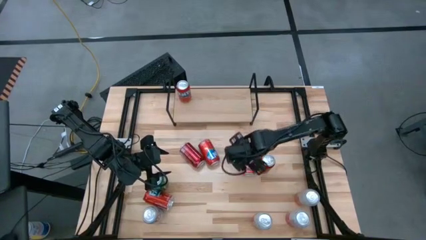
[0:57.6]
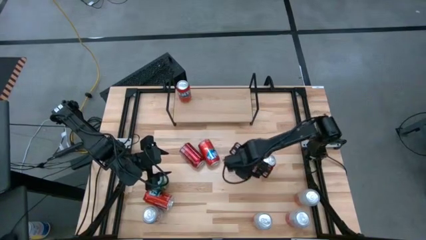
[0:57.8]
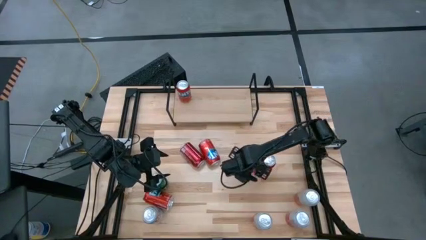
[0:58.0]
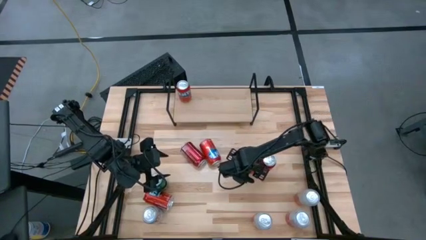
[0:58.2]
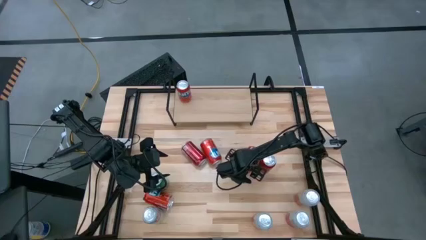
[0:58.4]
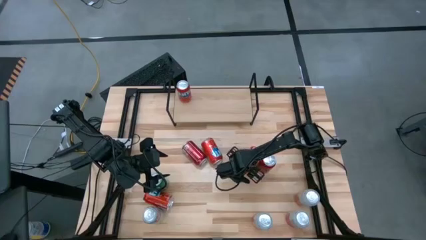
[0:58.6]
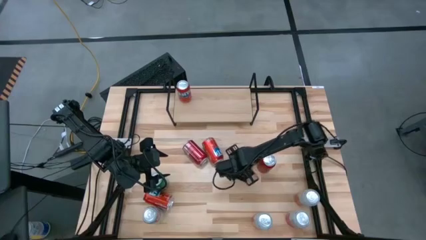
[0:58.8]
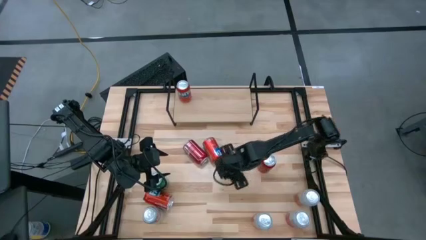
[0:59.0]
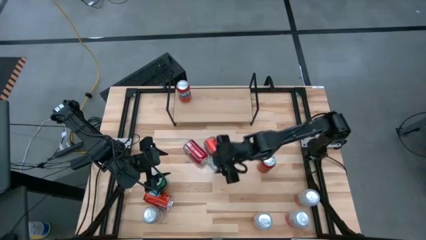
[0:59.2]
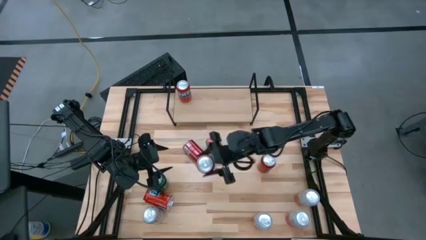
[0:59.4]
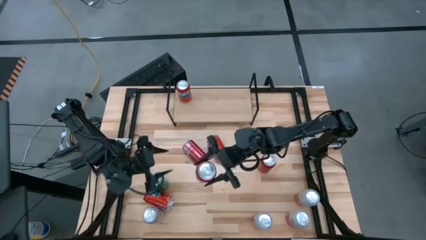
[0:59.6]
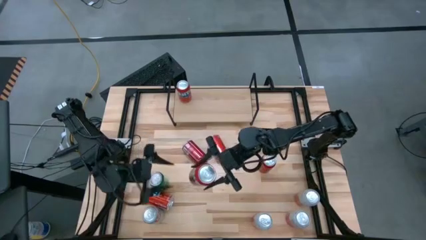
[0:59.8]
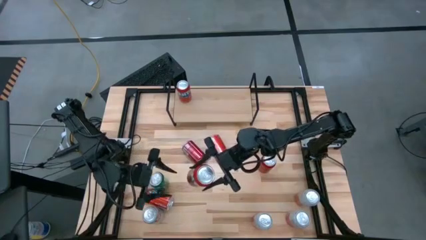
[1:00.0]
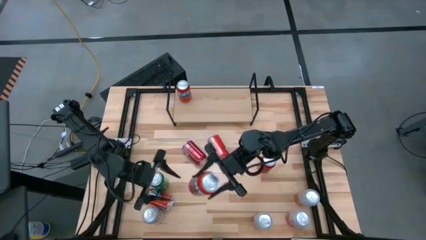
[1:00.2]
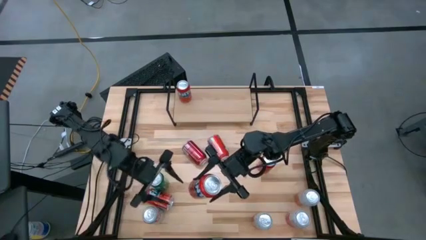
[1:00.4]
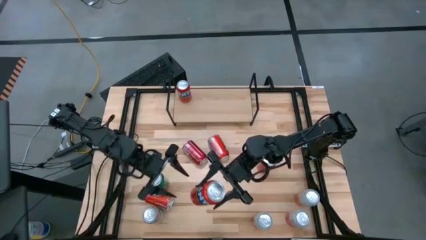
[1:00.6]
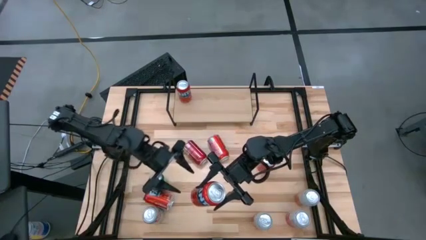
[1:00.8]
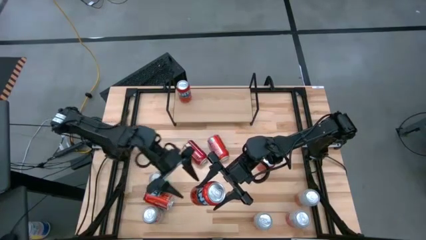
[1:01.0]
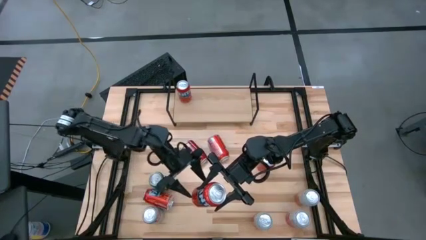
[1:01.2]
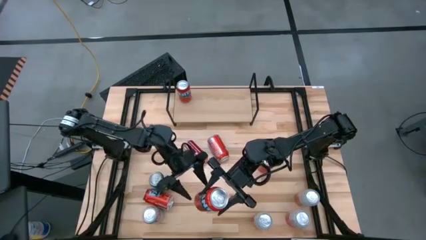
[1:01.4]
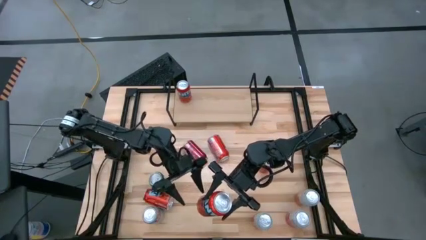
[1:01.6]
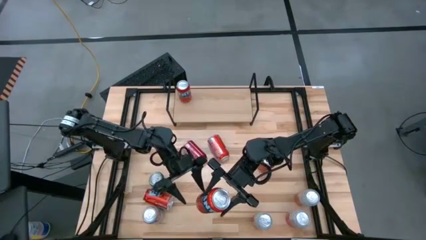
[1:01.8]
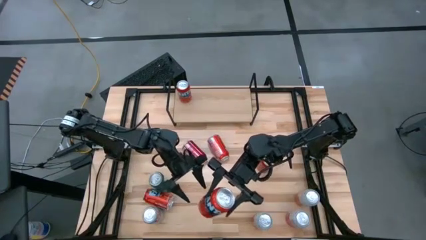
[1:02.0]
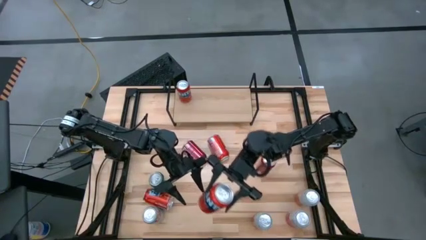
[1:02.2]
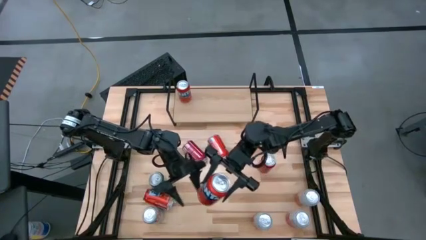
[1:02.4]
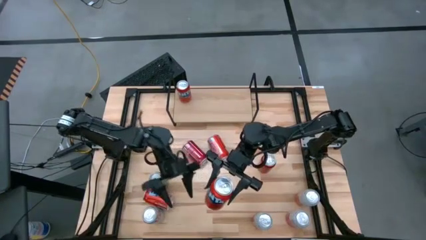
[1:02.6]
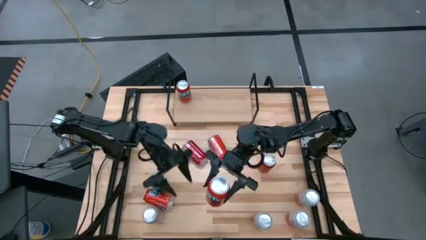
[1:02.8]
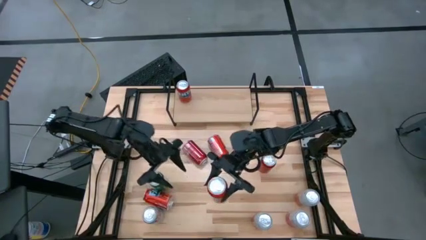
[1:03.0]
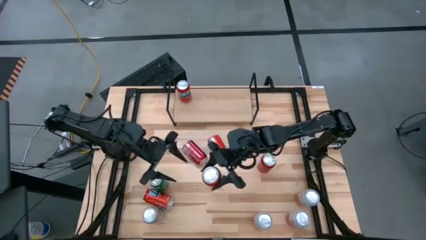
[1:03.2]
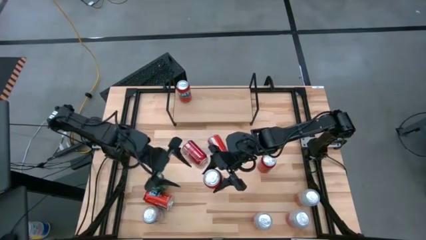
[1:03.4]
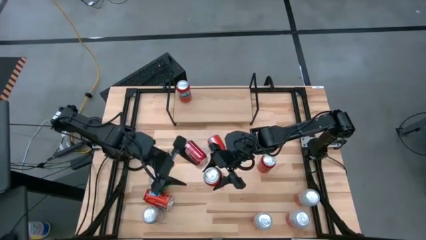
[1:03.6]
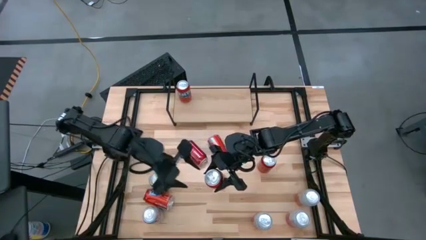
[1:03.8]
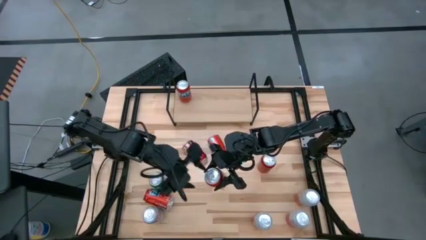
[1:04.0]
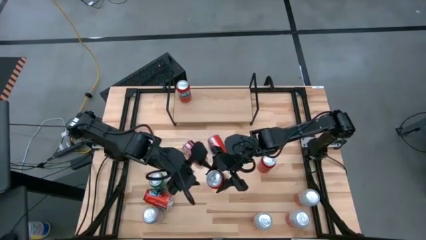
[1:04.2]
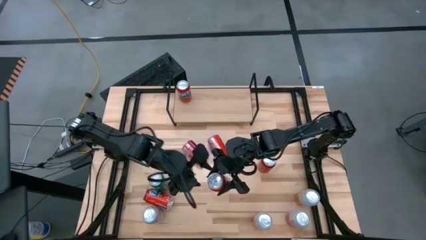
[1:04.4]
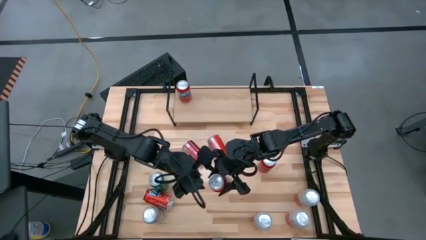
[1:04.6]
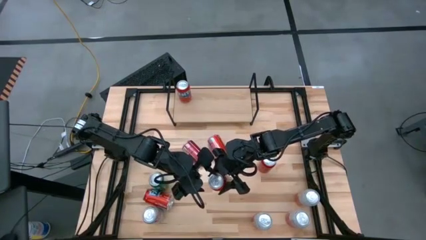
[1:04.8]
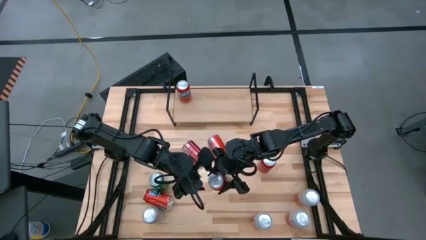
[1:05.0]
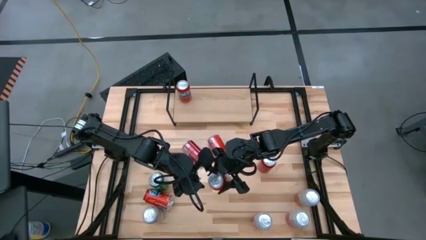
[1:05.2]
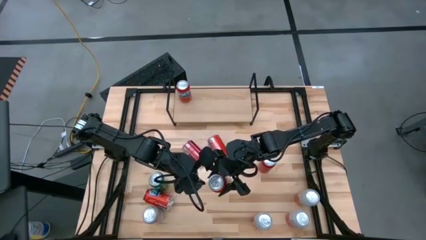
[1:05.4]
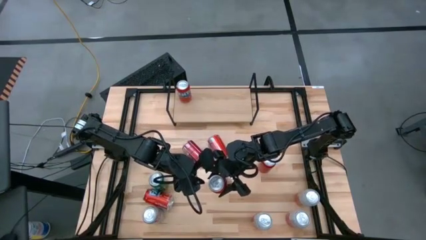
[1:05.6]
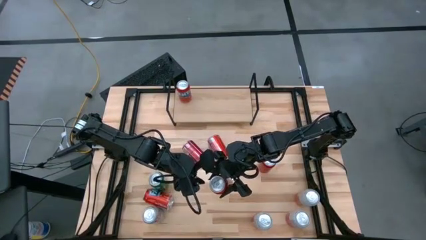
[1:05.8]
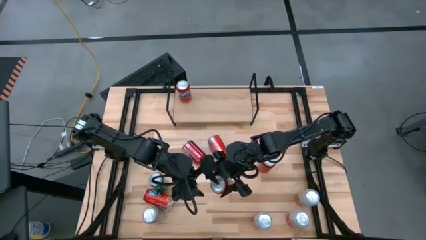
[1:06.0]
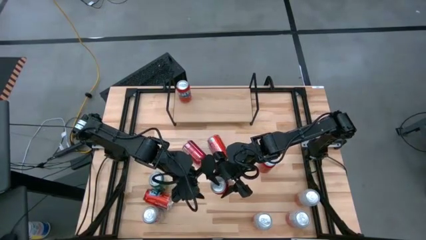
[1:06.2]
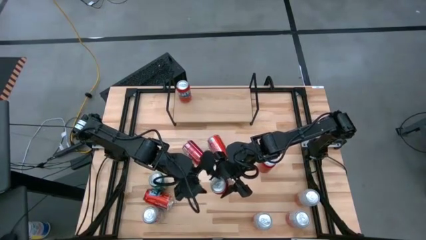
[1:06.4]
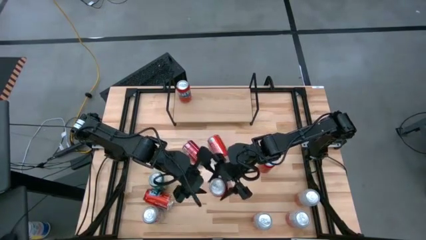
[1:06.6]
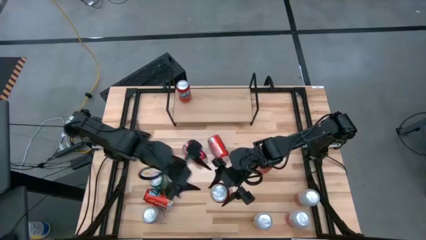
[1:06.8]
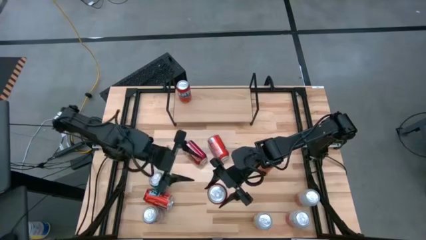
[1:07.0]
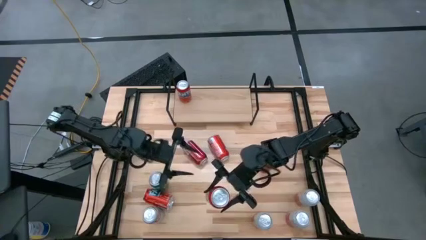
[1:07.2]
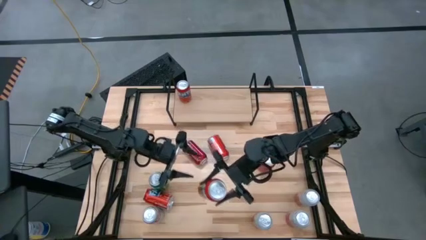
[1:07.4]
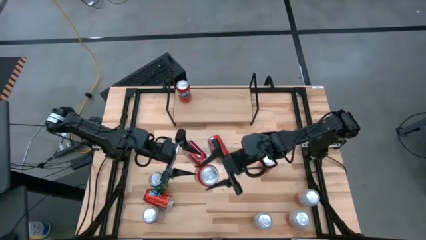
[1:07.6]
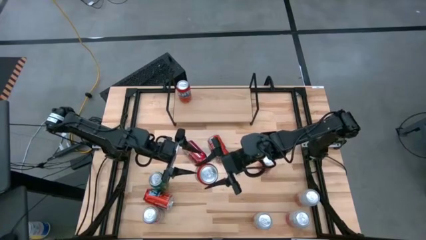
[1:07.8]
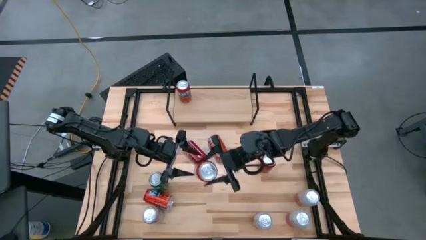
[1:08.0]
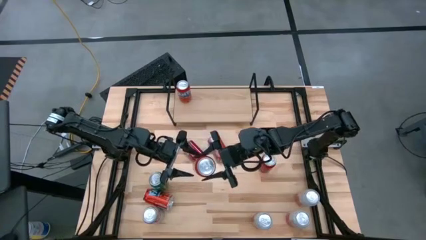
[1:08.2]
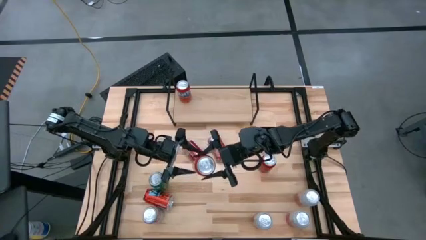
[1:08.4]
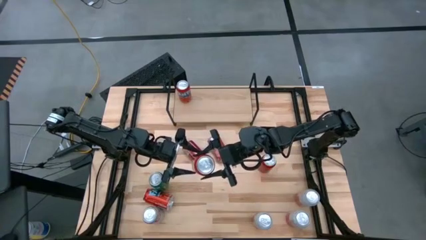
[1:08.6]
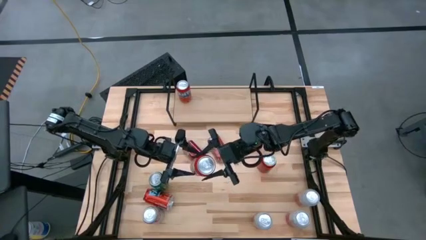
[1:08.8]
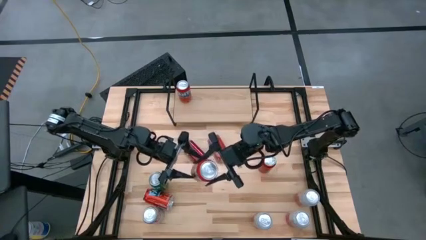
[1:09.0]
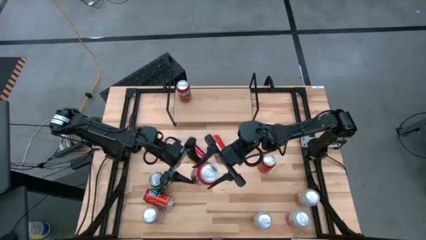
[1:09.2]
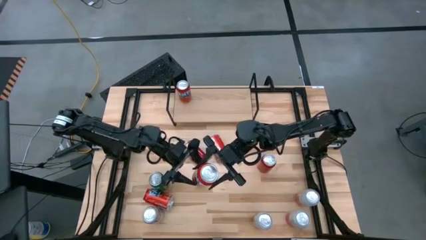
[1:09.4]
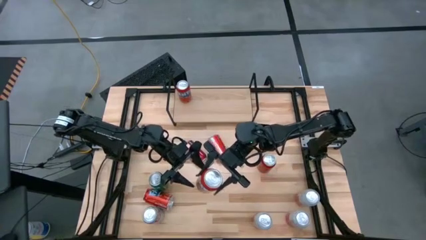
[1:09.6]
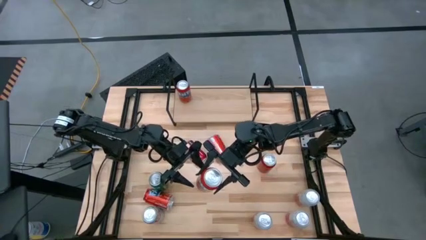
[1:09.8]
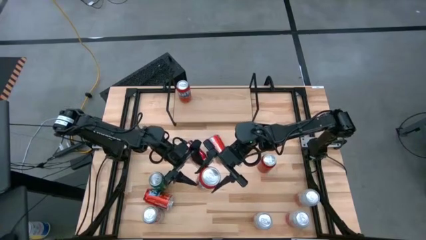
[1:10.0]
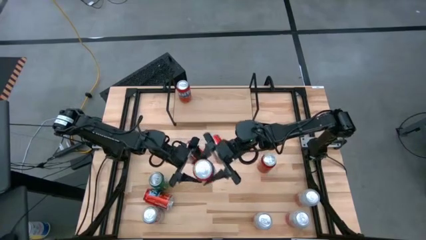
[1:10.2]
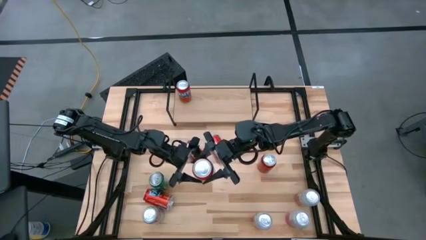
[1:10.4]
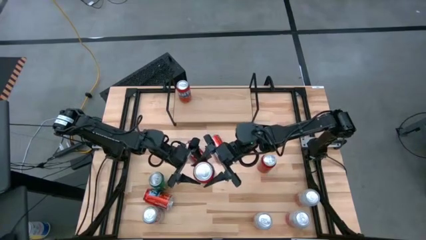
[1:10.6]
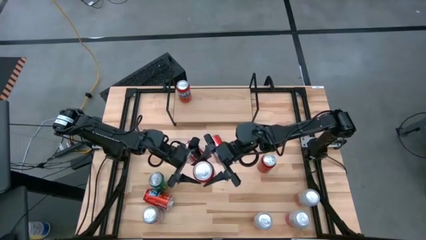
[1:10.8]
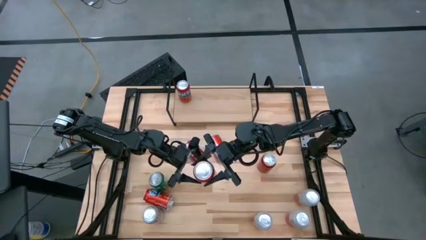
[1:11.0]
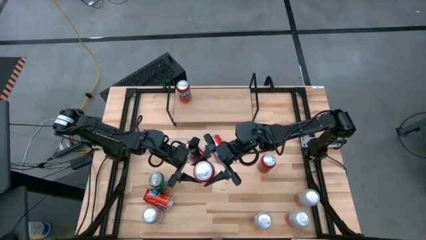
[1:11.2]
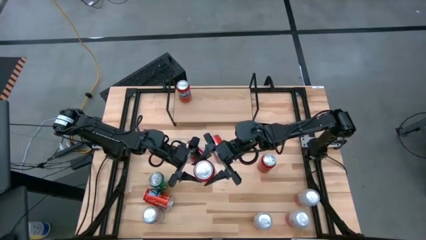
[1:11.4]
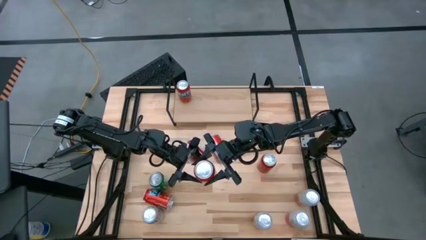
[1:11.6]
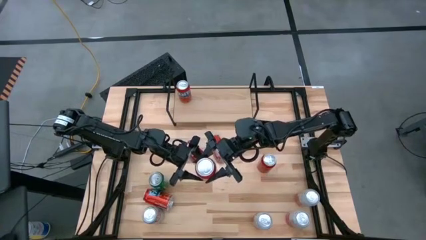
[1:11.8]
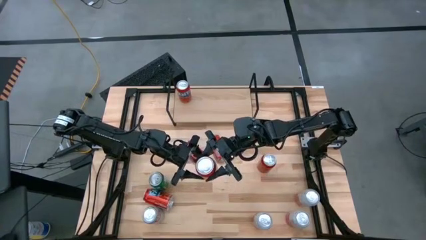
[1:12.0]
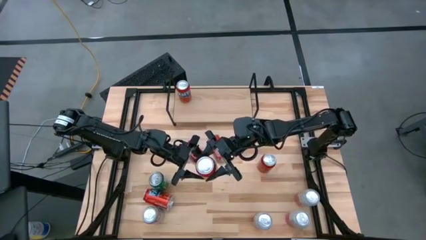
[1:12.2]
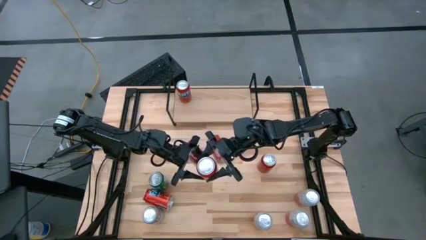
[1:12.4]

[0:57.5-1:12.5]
Task: Place canned beverage on shelf
Put the red soda can on the shelf and align with the other red soda can
